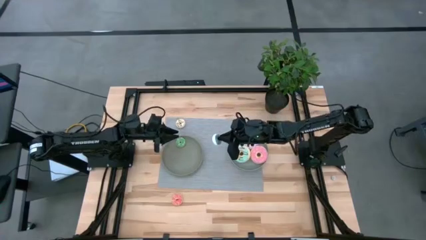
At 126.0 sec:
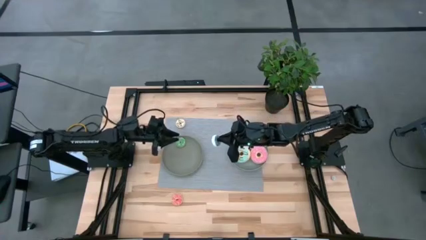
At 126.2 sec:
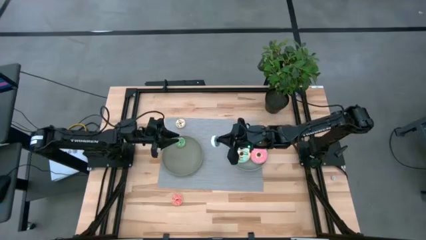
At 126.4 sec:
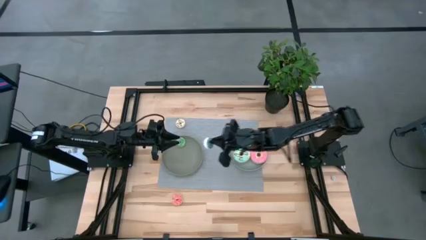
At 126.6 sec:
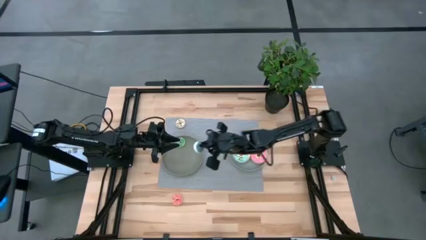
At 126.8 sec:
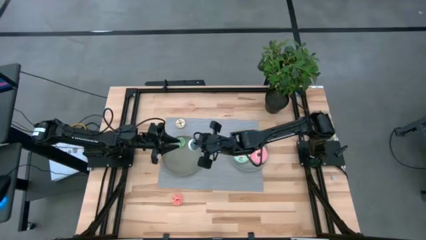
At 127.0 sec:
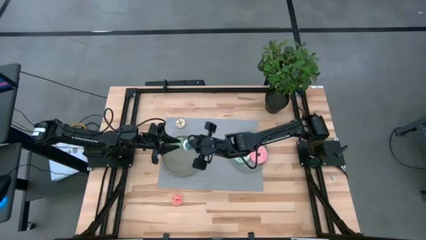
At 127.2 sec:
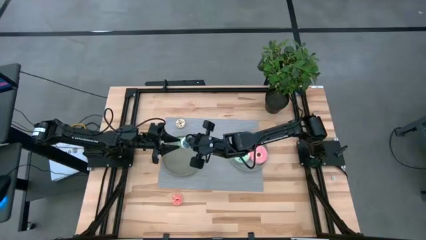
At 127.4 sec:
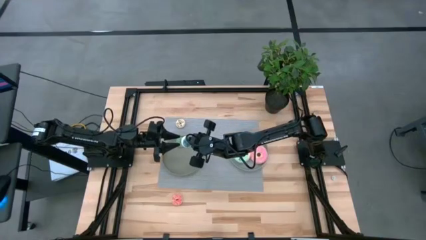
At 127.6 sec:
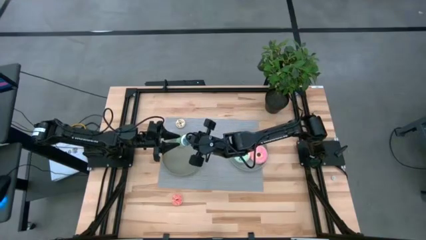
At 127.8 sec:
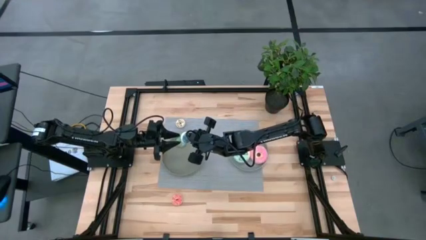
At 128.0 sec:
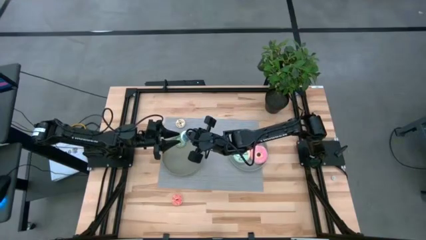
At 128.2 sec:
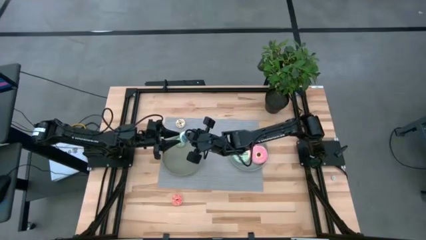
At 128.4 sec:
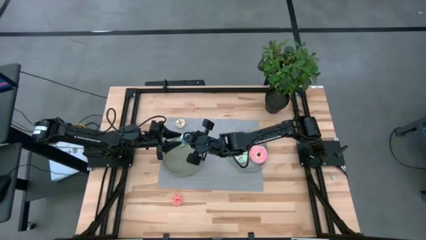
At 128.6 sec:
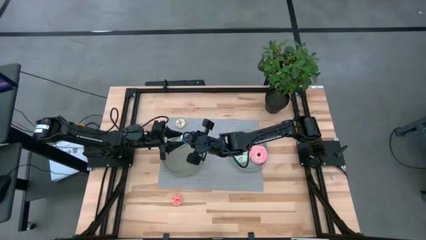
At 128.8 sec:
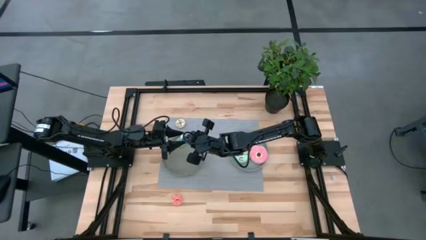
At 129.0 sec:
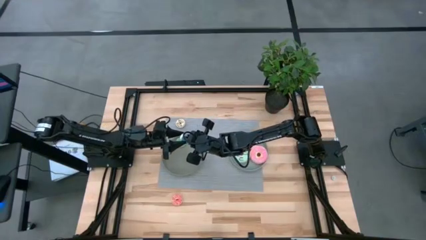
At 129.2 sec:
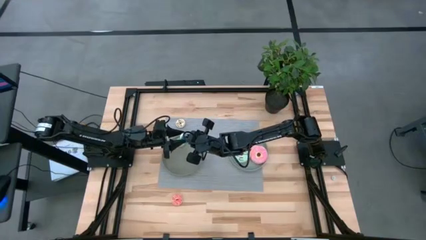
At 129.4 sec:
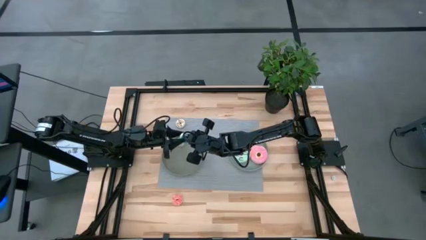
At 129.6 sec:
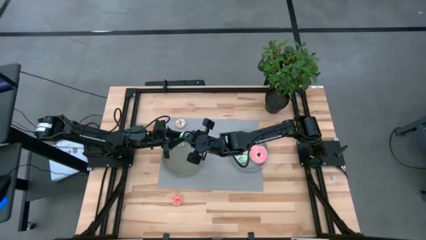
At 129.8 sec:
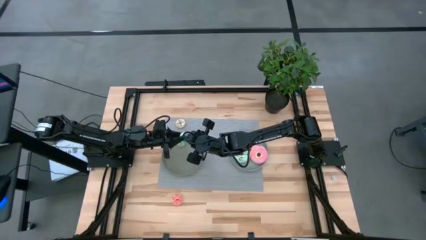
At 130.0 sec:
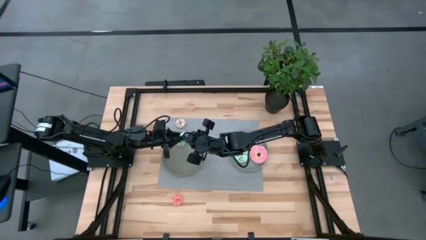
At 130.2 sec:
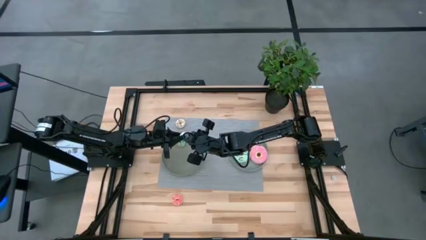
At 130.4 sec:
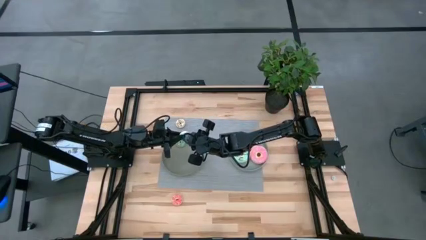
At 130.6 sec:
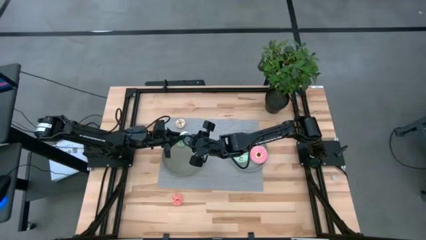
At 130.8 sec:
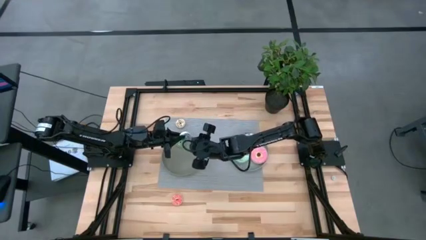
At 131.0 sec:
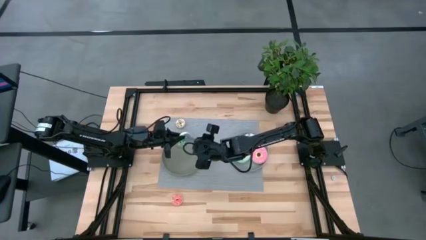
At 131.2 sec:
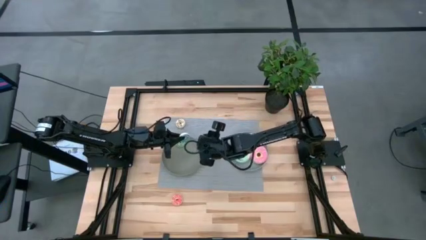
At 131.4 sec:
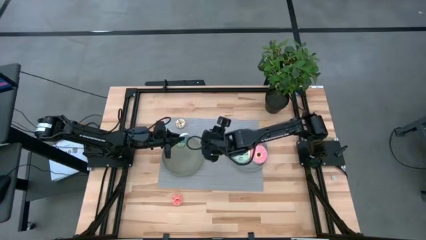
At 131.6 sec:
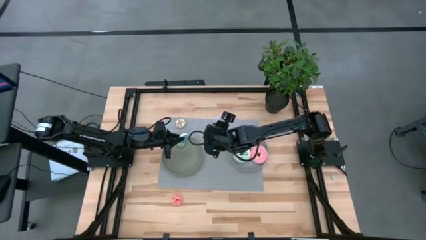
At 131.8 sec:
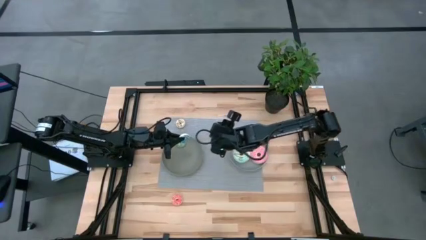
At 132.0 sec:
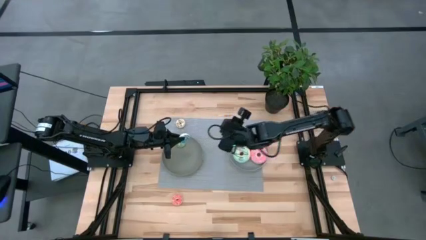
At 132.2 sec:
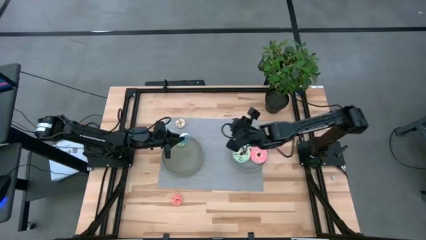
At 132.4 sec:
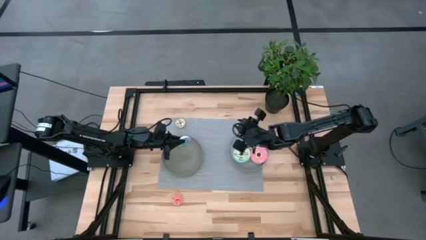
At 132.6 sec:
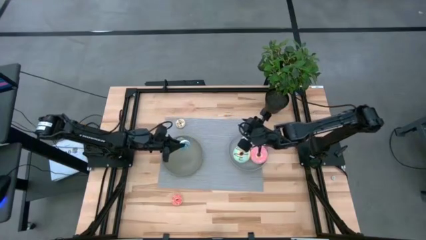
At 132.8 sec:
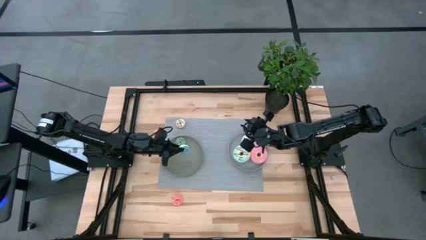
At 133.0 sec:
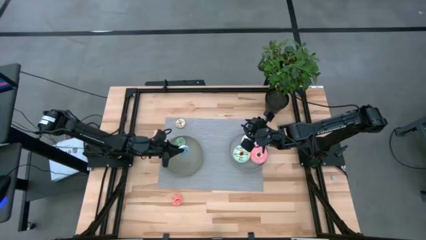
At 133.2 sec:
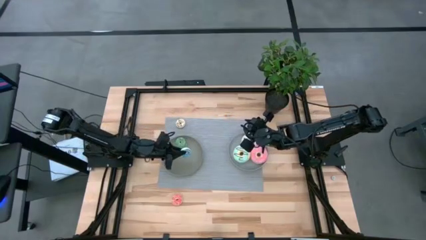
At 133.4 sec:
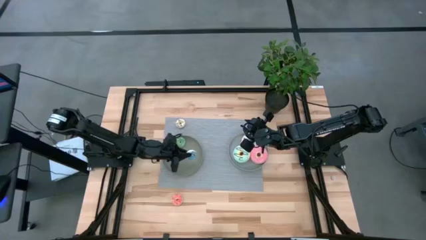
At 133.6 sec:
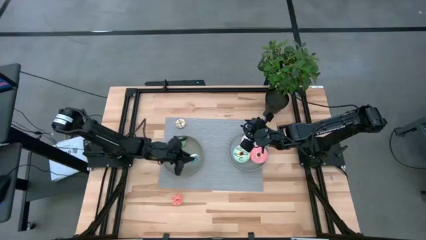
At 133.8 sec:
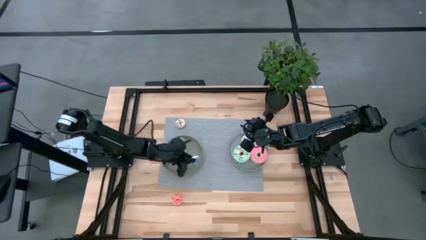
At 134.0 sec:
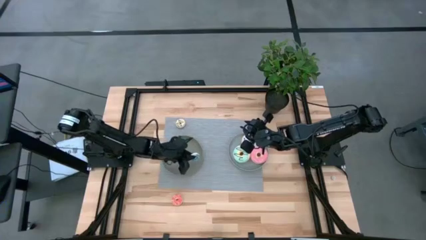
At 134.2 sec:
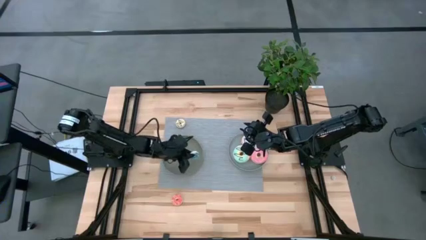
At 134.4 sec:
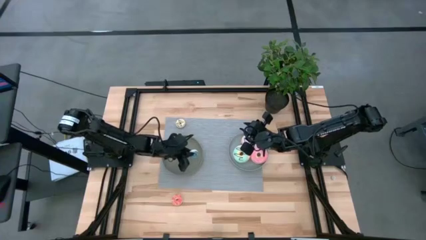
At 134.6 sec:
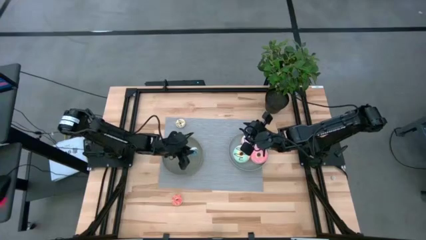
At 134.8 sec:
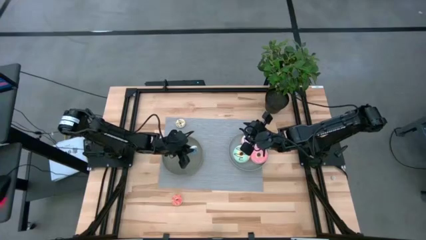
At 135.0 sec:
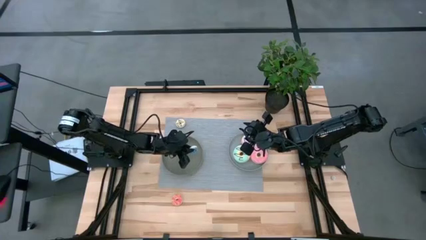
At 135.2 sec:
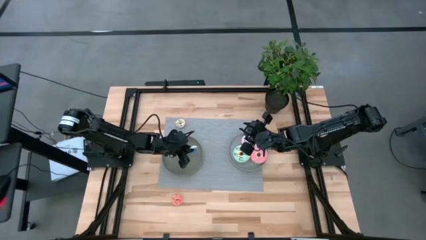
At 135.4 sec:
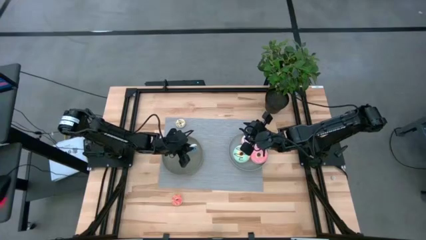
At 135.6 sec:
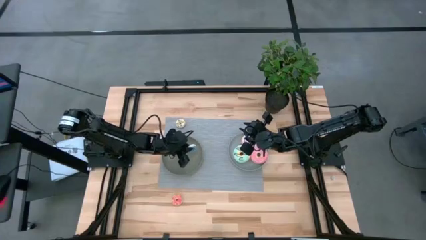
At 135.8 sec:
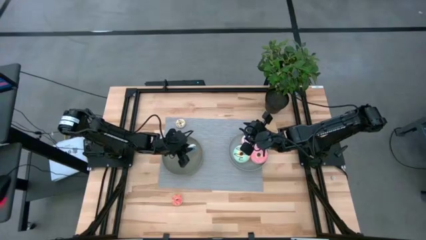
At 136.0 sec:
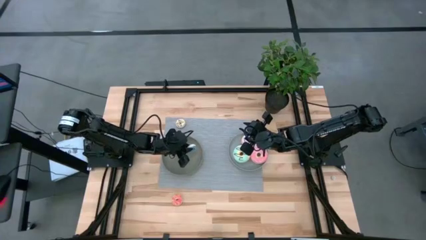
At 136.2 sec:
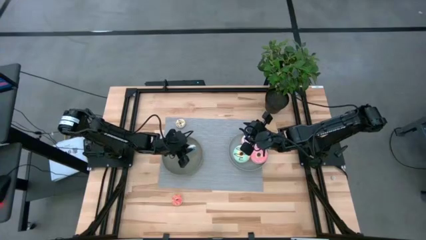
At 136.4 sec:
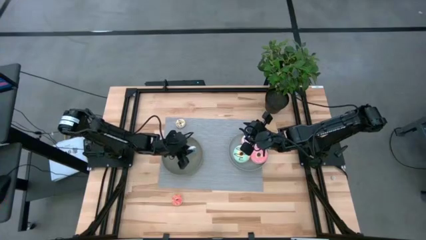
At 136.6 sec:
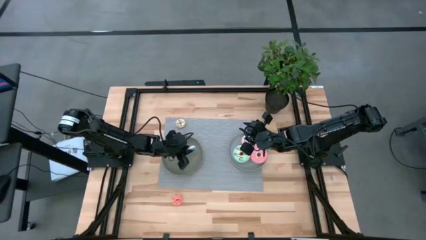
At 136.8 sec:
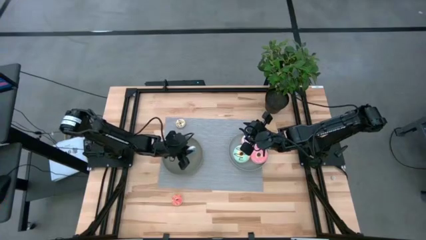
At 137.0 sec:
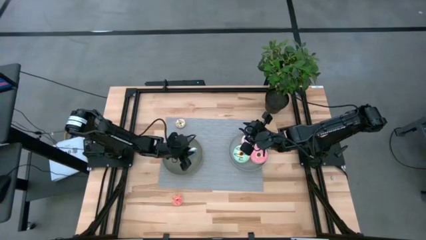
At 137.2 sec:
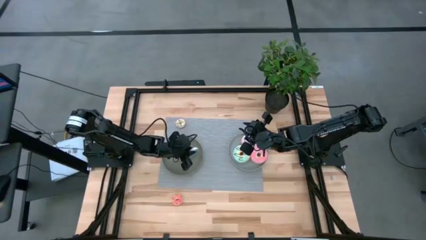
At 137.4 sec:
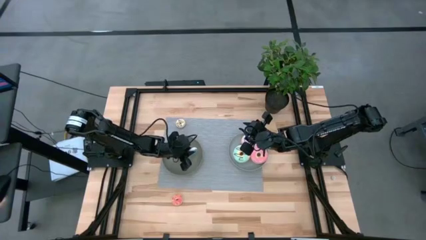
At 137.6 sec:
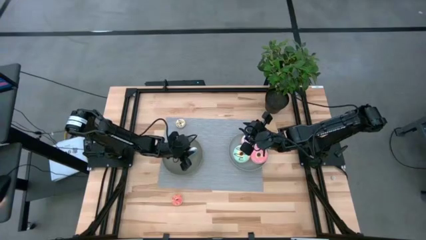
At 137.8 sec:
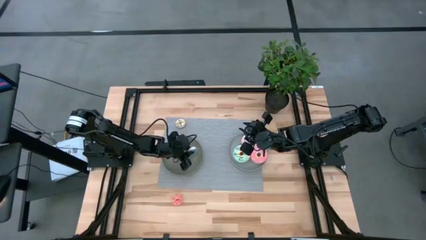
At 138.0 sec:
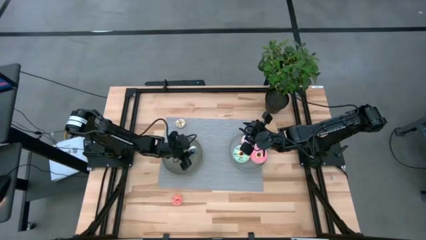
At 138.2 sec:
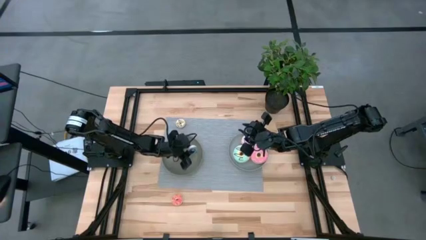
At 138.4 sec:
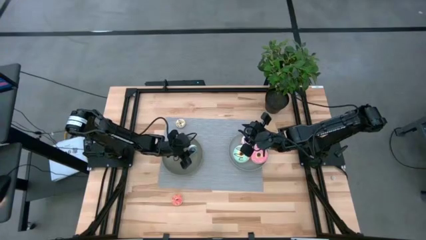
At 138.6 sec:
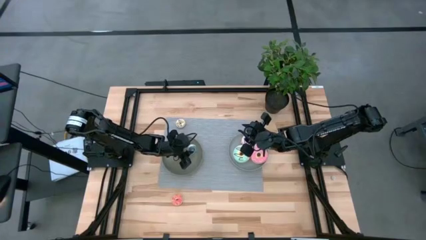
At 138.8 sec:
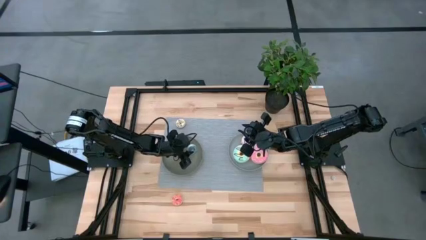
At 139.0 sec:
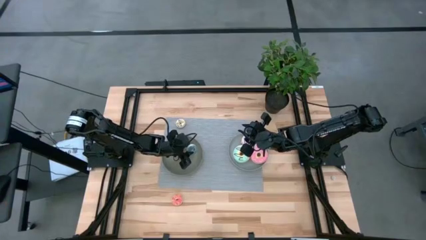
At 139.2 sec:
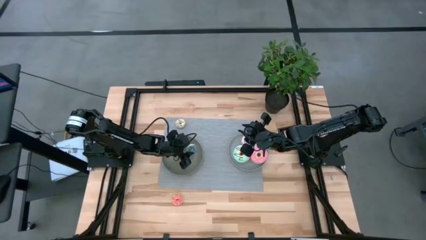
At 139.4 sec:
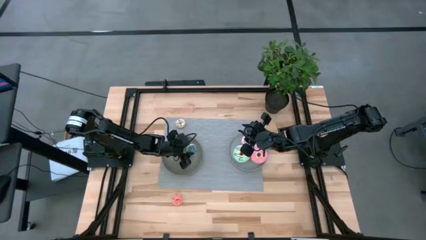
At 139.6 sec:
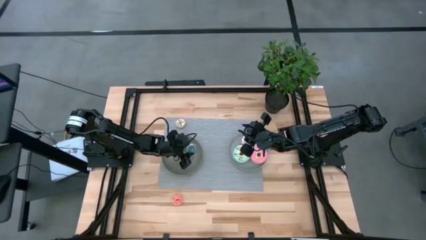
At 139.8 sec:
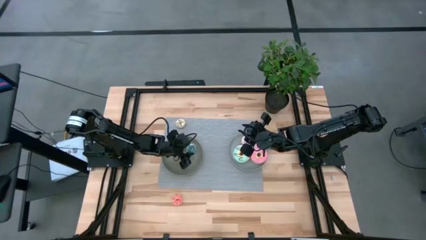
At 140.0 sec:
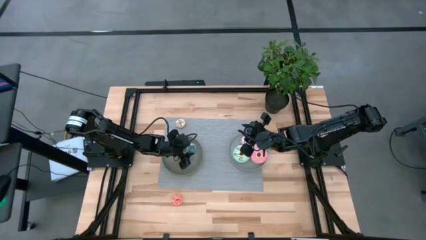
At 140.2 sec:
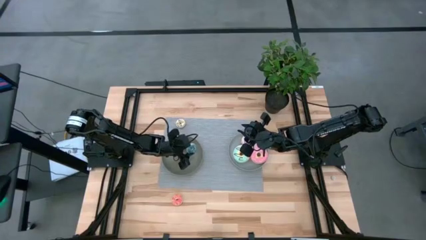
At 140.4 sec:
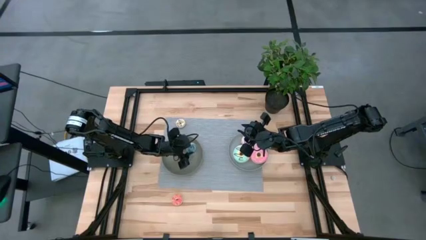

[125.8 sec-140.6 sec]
Task: Pick & Place donuts
Put the small blue donut into the green plate

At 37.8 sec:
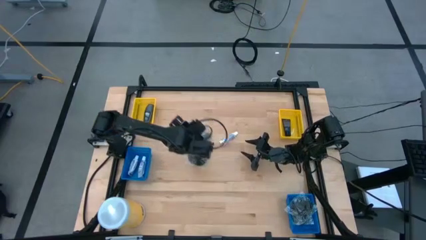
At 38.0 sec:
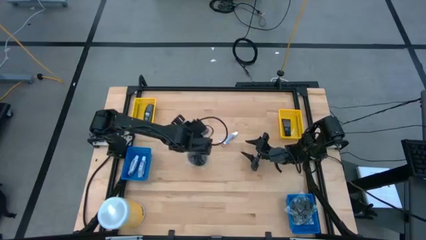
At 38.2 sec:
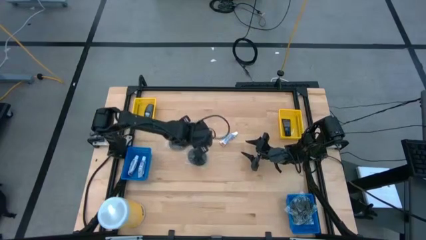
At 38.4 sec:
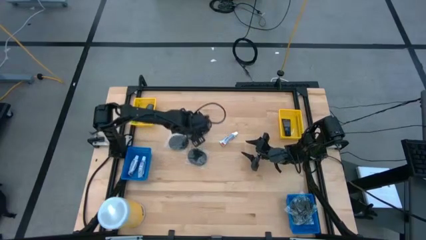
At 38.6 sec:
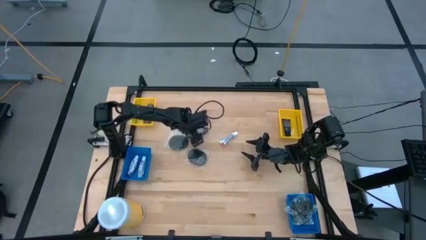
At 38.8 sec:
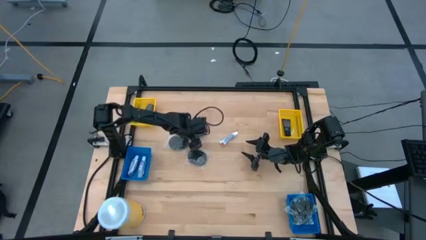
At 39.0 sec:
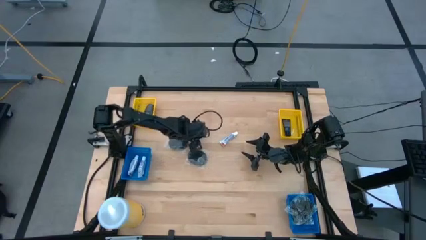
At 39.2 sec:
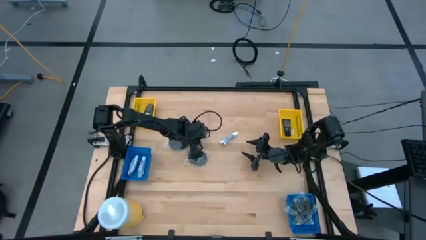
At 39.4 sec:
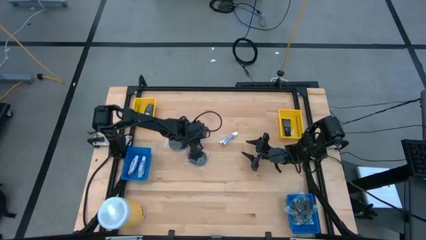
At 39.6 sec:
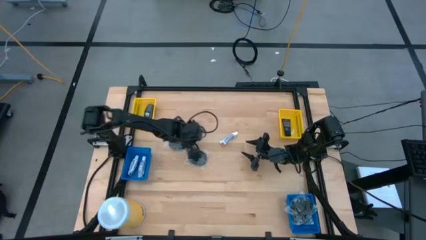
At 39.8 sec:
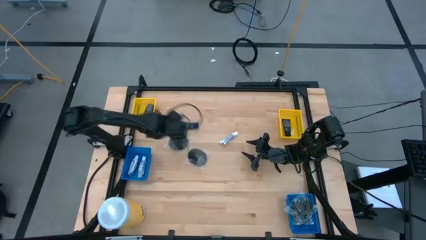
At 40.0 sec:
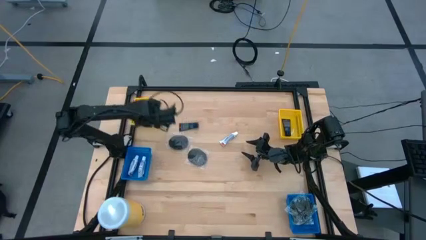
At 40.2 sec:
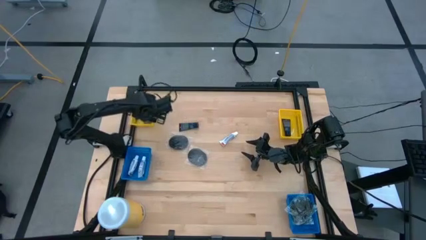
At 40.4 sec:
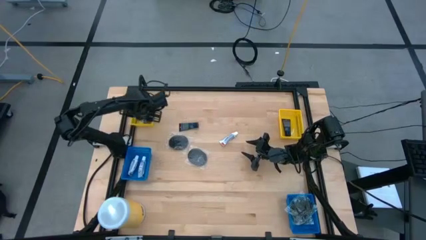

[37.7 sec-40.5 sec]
Task: Pick & Place Travel size toiletries
Put the gray deodorant into the left yellow basket
